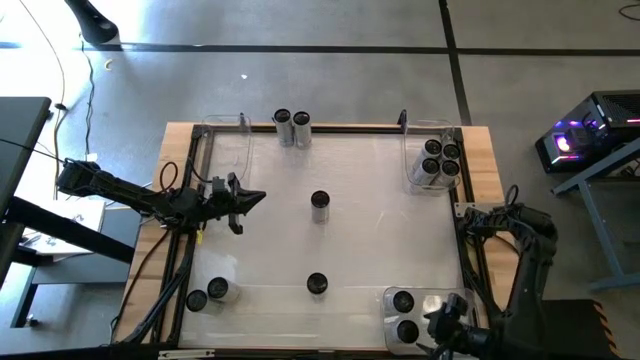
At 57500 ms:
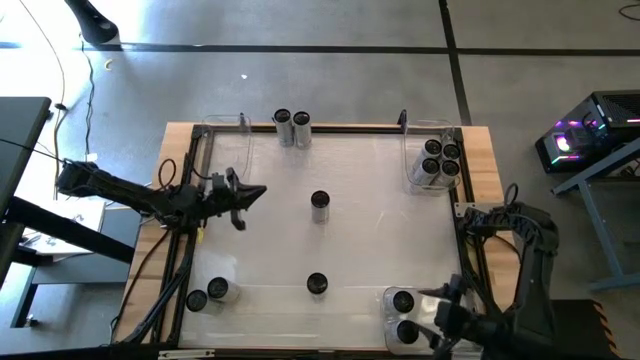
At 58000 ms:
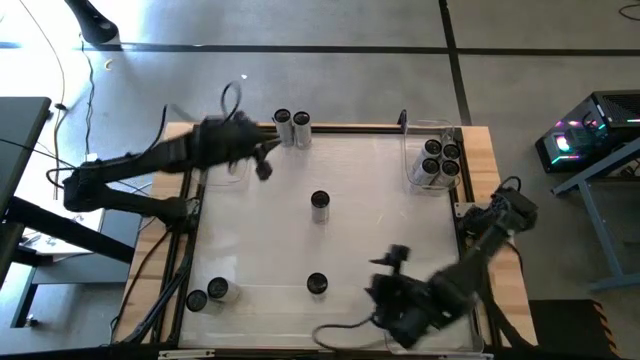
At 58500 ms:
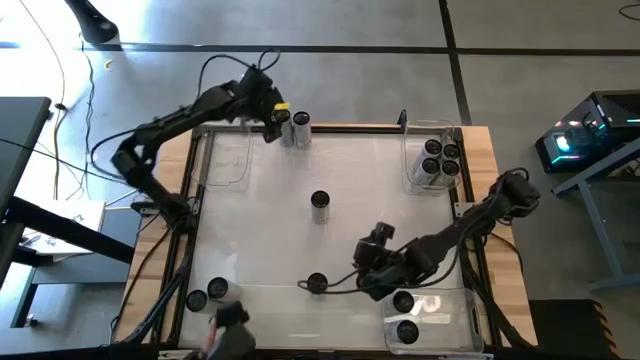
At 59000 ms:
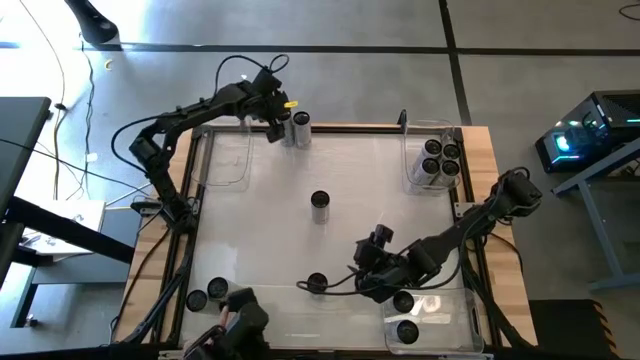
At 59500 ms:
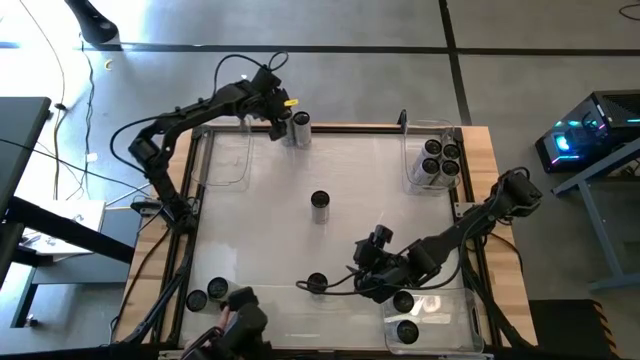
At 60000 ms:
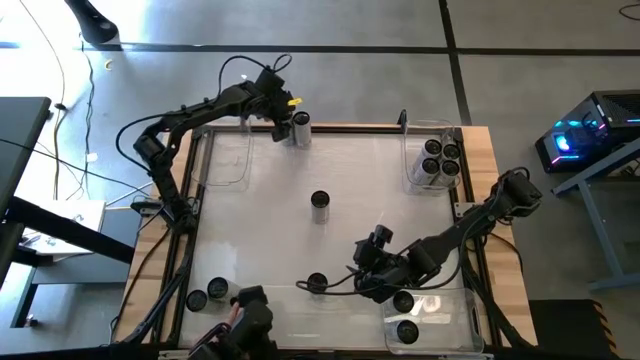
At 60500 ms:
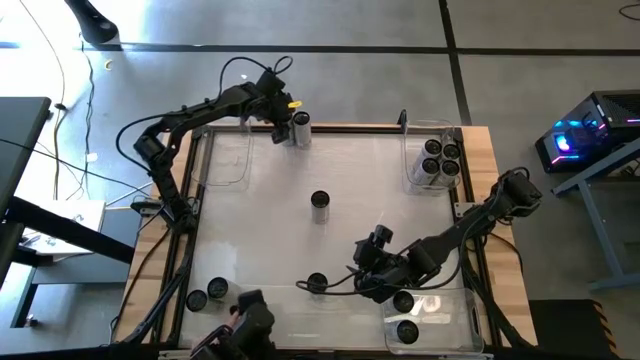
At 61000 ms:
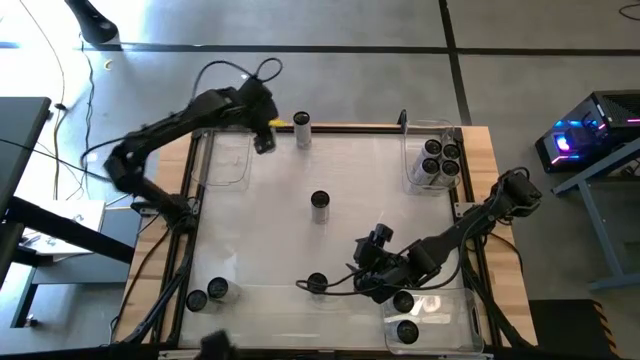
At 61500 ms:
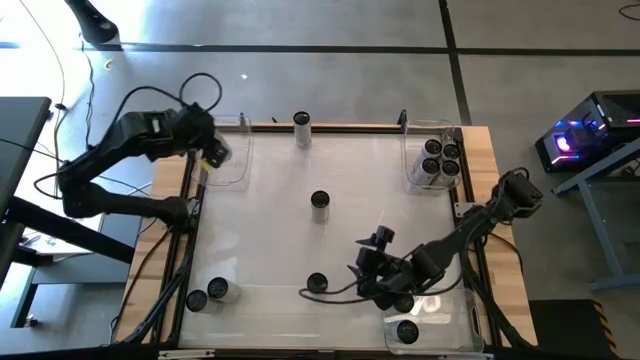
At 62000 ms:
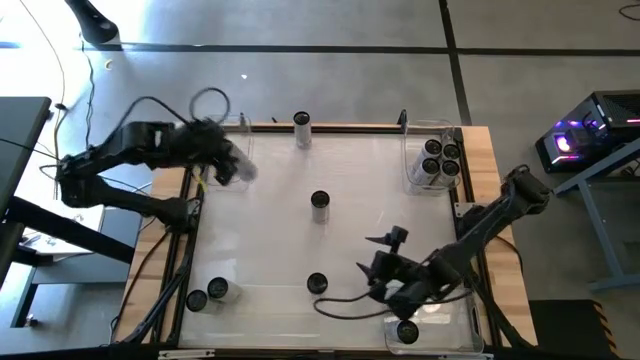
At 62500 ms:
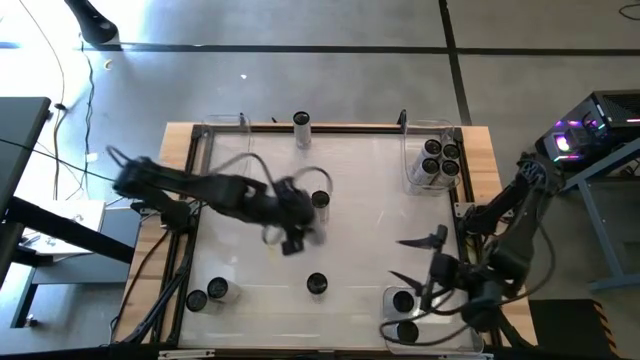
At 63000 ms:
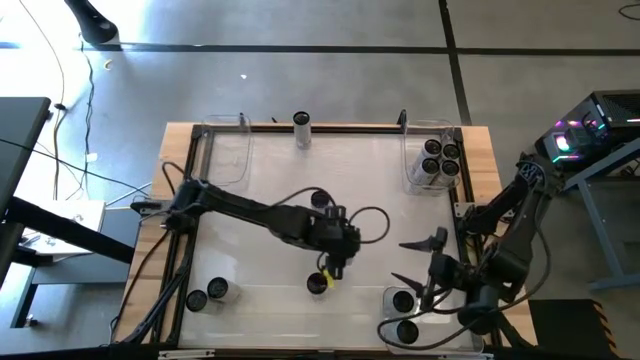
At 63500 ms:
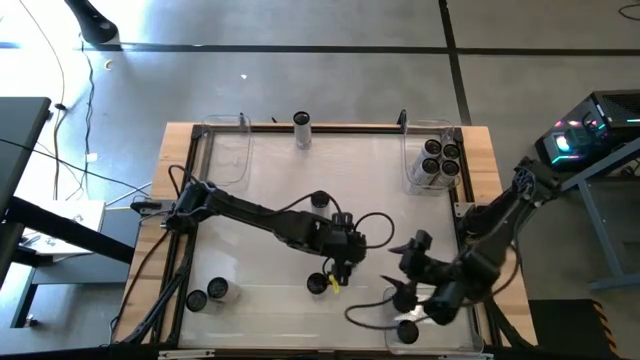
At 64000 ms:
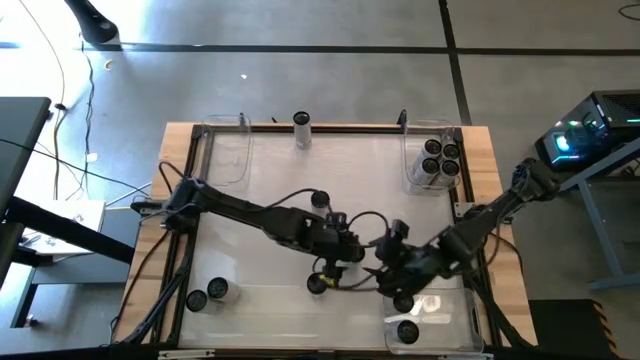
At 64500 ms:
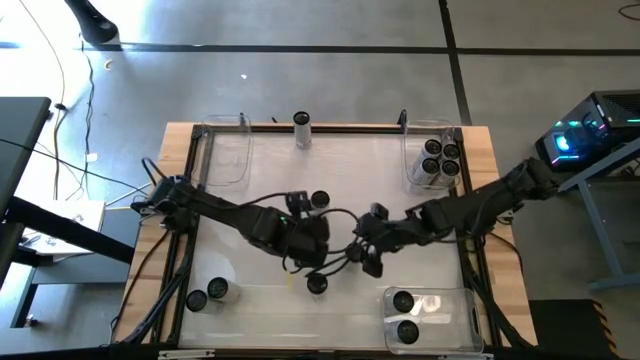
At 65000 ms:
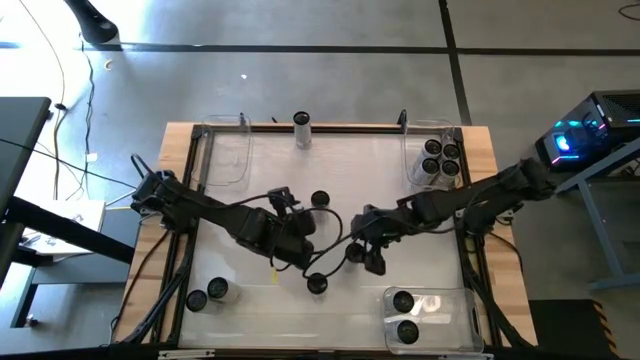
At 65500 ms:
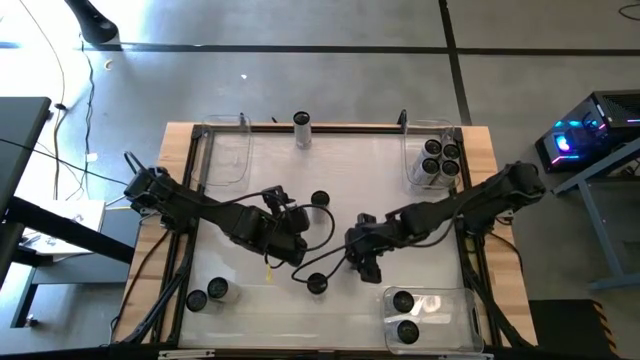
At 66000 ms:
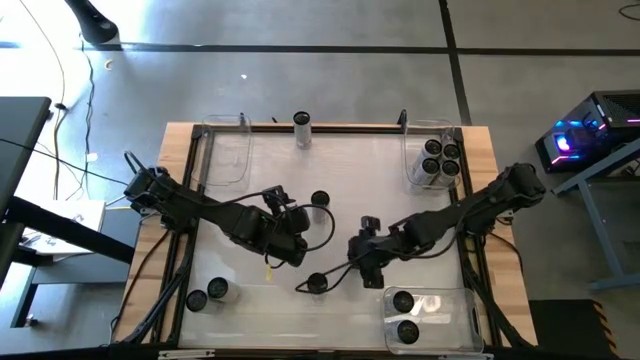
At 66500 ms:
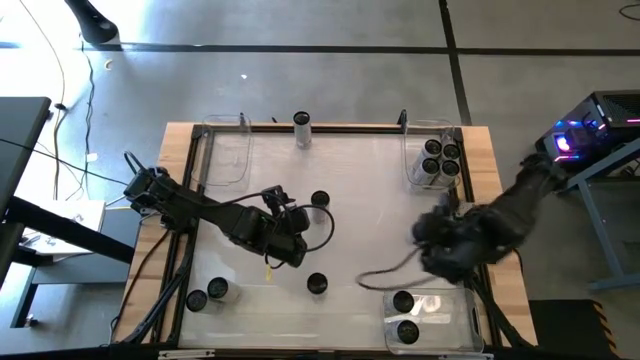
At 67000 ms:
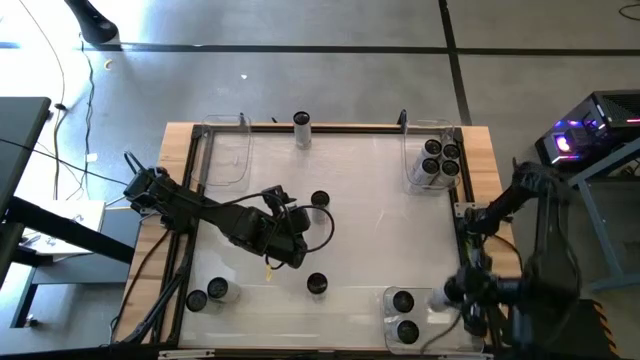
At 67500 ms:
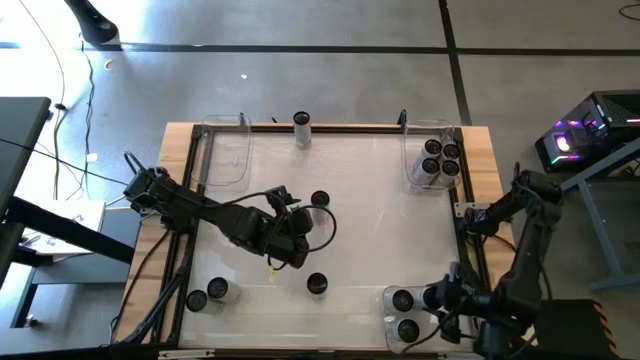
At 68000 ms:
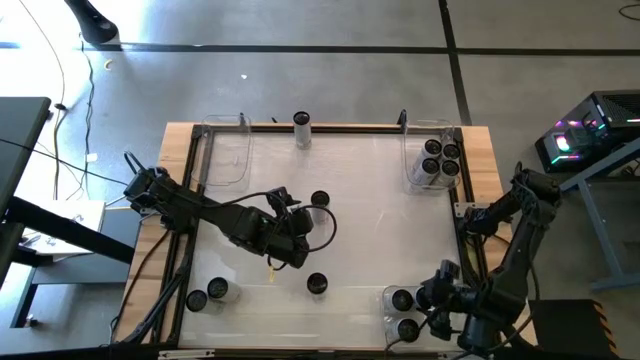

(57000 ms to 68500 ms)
Task: Sort soda cans
Put the blue soda can into the bottom right transparent bin

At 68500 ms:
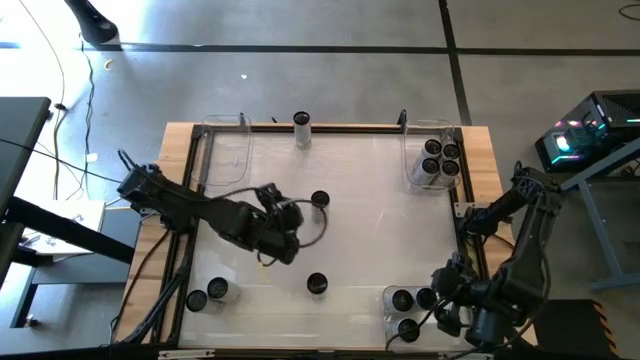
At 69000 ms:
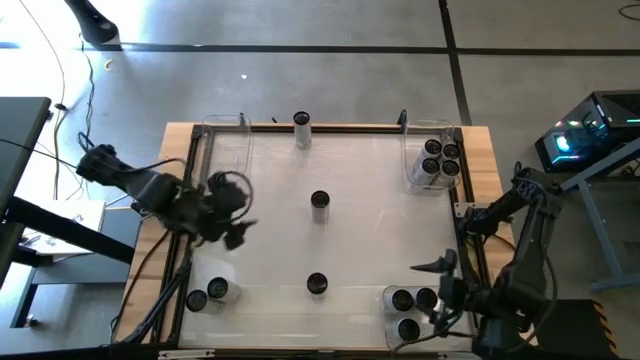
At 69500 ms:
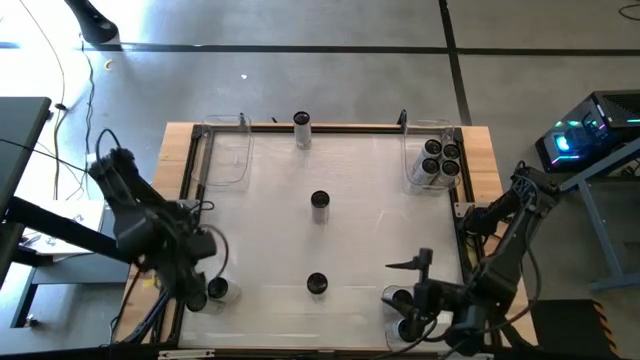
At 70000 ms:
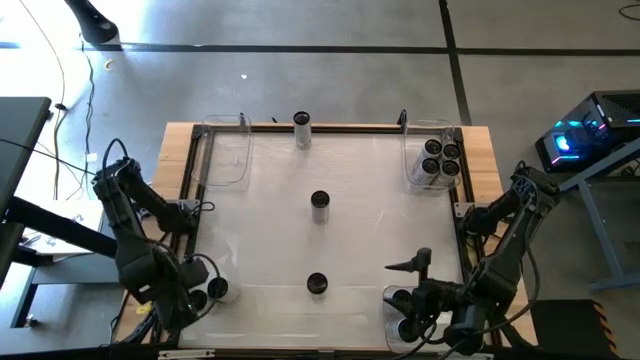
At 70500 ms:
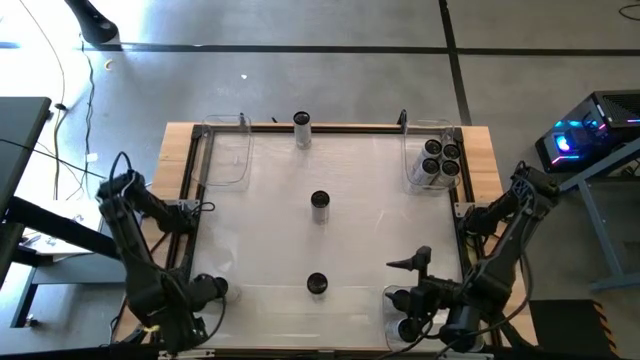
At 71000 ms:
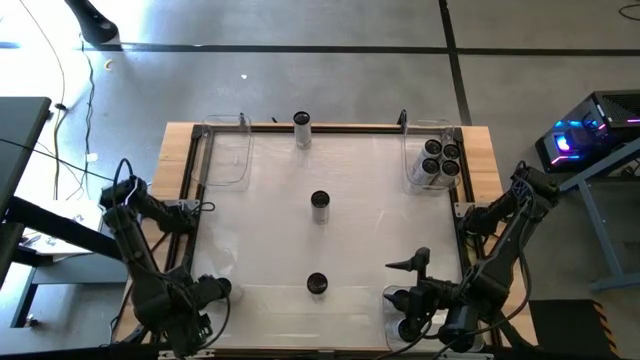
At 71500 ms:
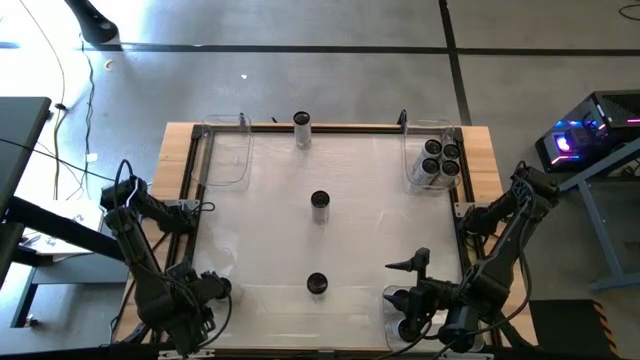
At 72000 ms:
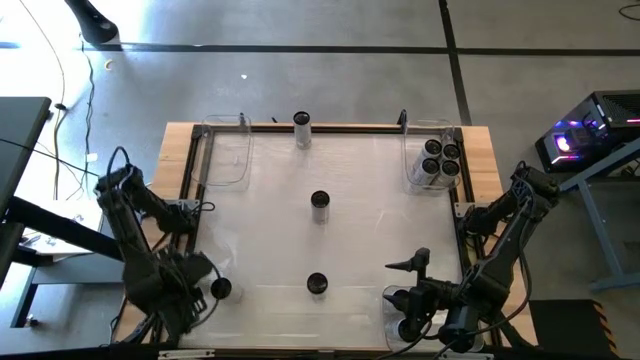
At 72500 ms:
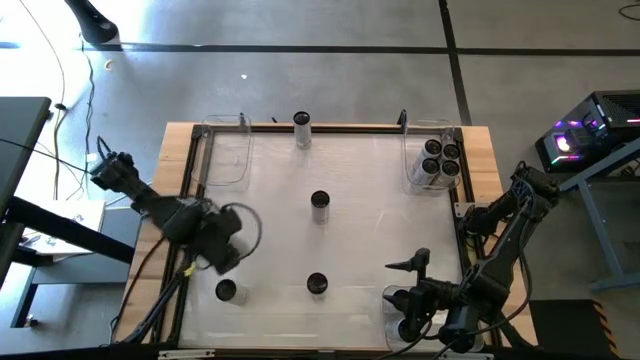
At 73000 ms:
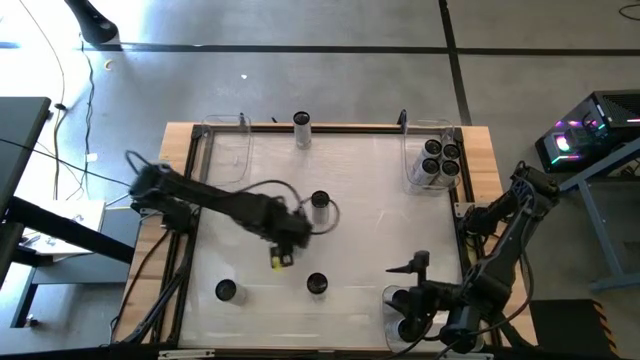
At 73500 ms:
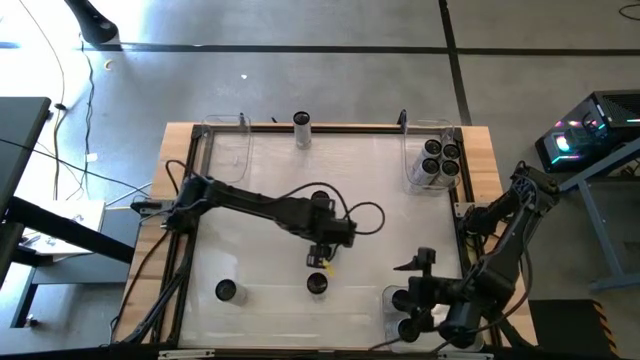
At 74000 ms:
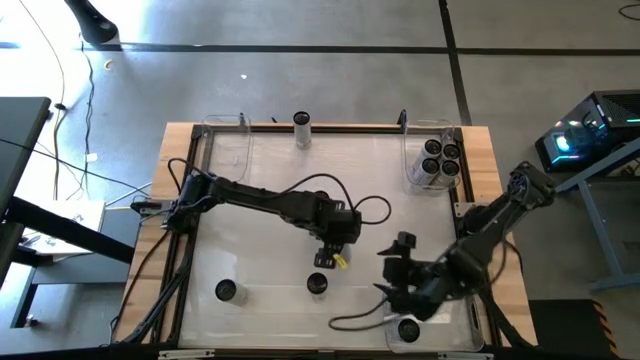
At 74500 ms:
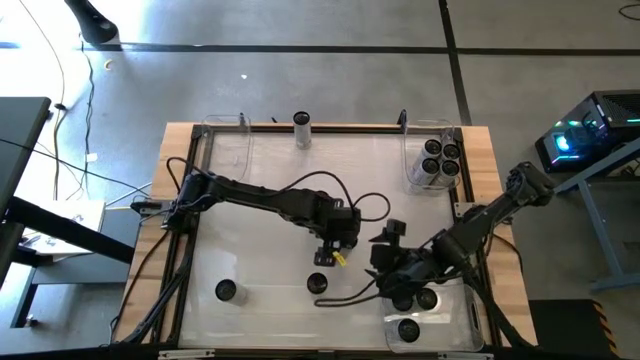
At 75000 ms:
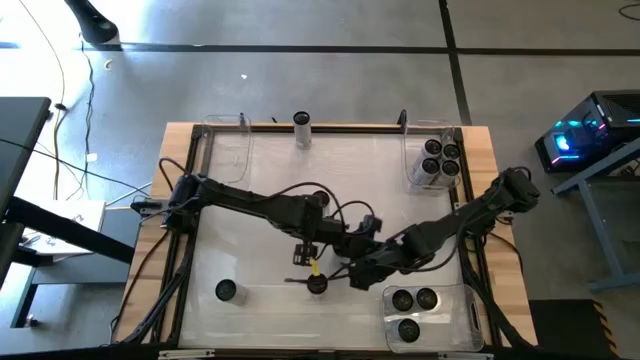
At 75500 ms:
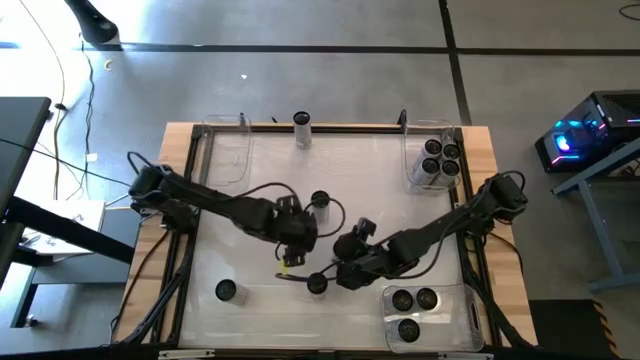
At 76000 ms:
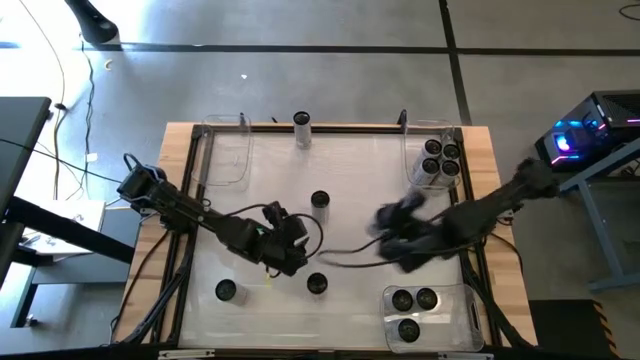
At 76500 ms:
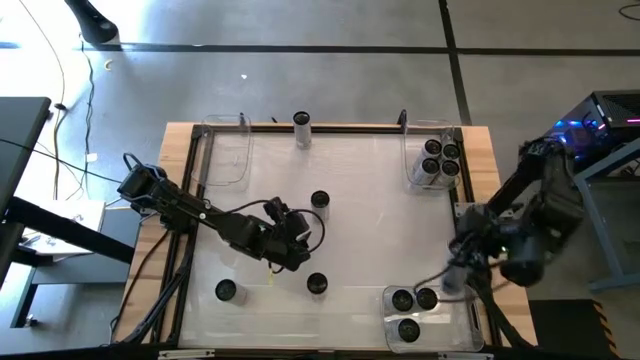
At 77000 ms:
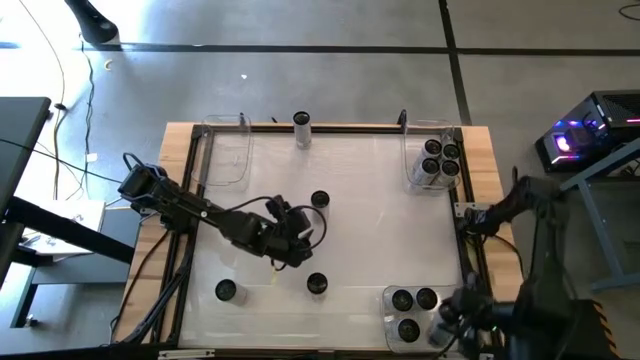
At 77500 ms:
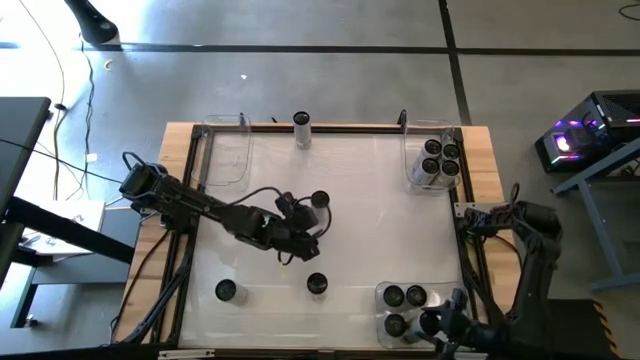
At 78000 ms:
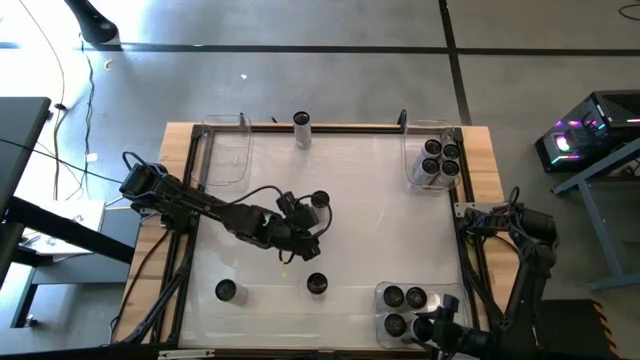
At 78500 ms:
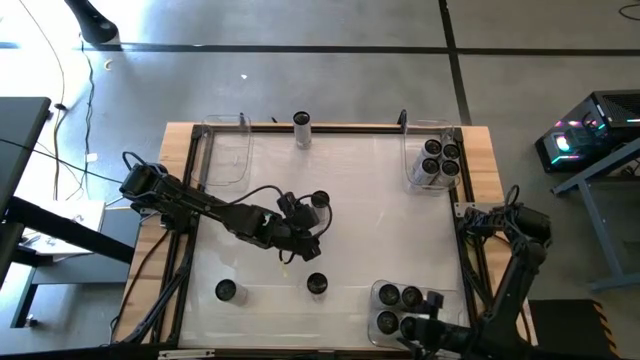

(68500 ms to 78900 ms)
Put the blue soda can into the bottom right transparent bin
